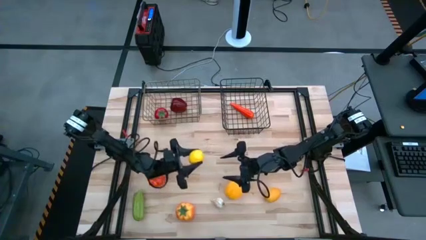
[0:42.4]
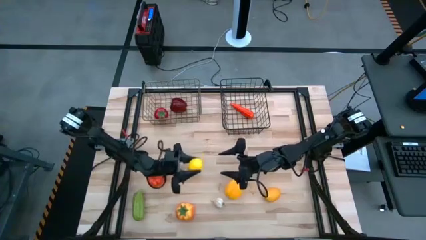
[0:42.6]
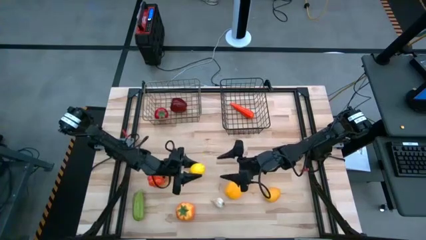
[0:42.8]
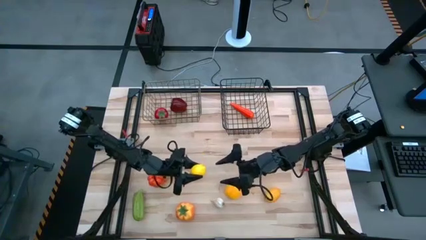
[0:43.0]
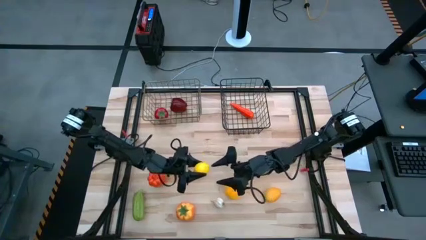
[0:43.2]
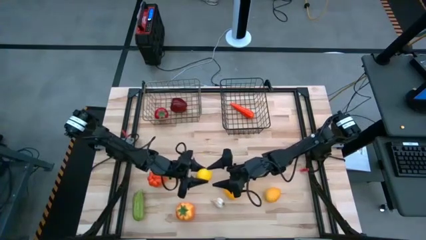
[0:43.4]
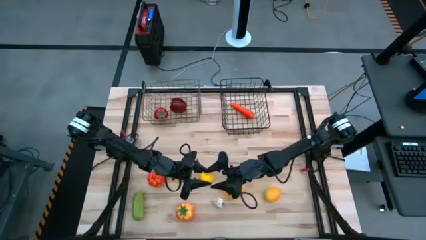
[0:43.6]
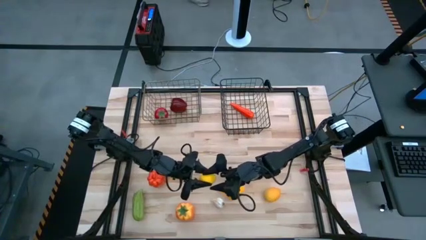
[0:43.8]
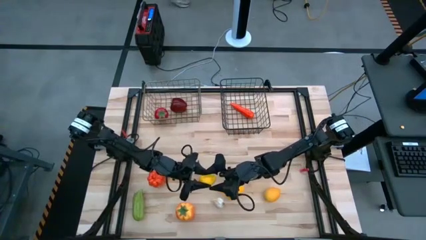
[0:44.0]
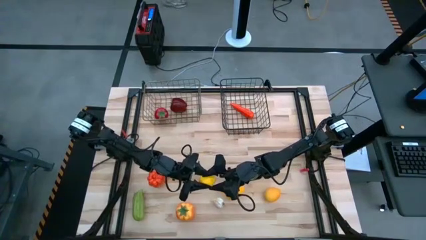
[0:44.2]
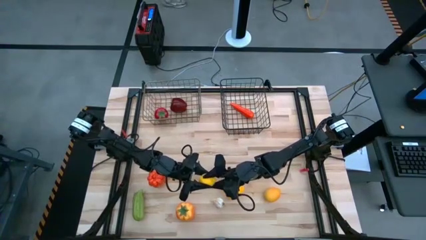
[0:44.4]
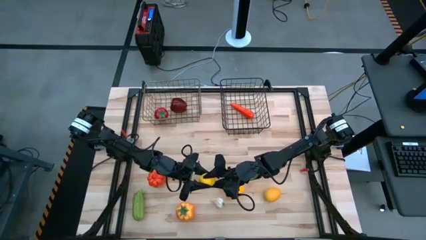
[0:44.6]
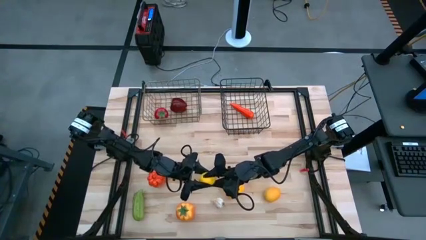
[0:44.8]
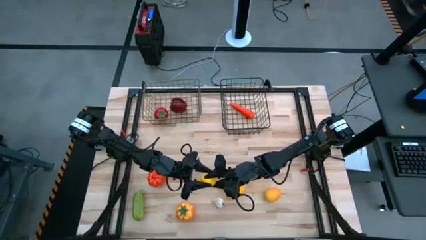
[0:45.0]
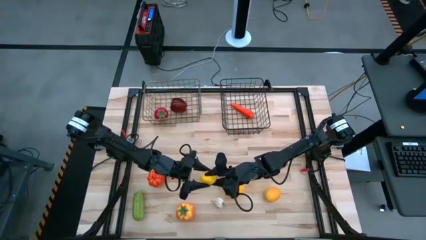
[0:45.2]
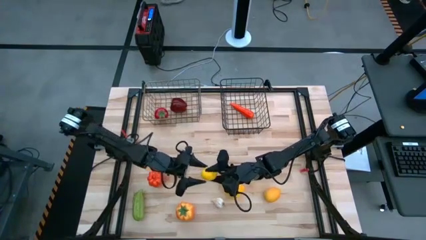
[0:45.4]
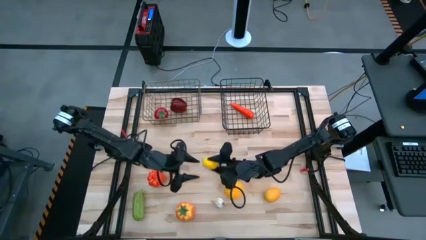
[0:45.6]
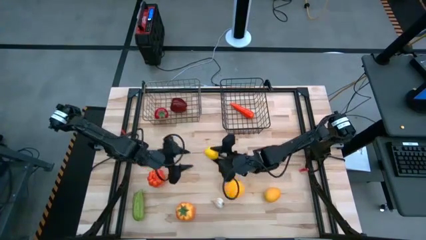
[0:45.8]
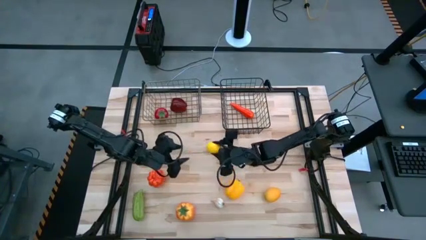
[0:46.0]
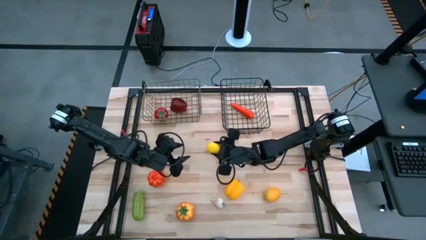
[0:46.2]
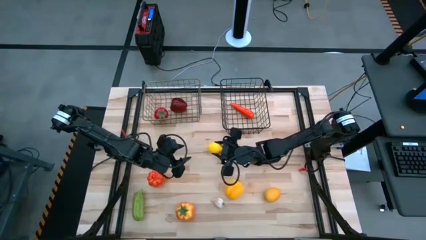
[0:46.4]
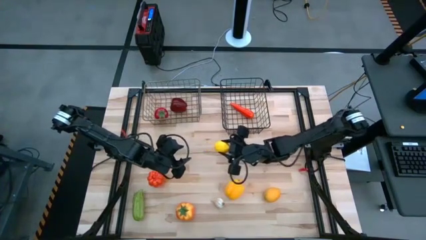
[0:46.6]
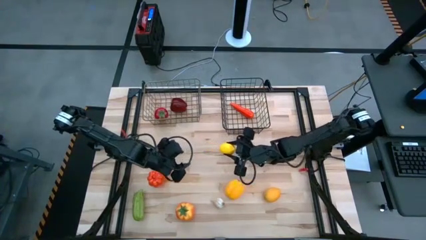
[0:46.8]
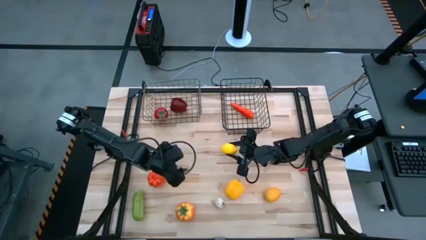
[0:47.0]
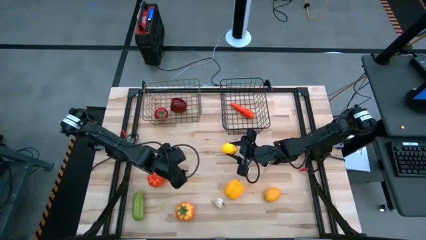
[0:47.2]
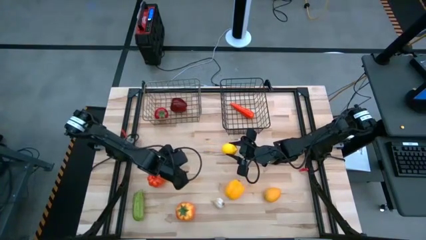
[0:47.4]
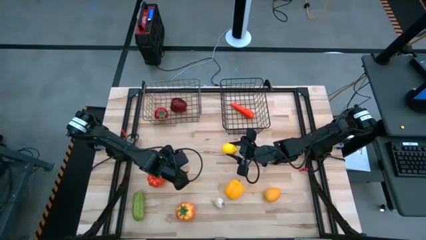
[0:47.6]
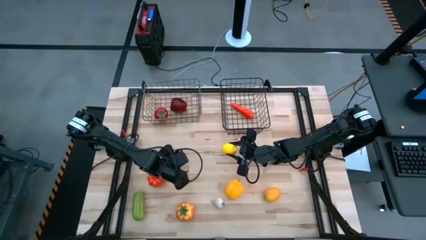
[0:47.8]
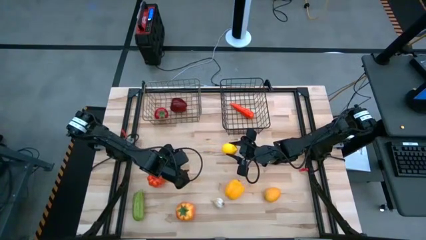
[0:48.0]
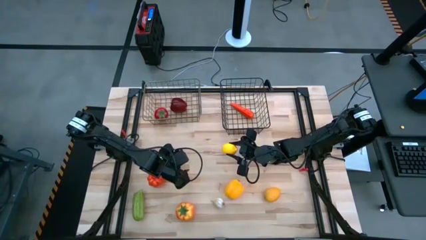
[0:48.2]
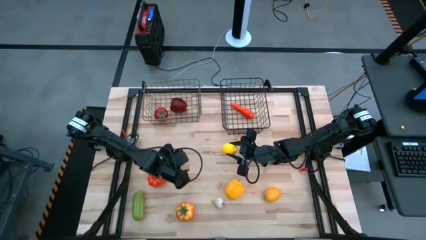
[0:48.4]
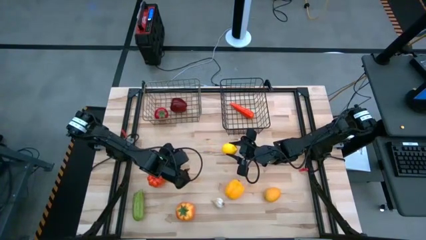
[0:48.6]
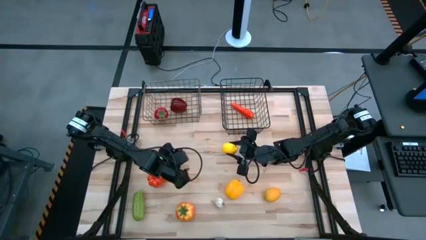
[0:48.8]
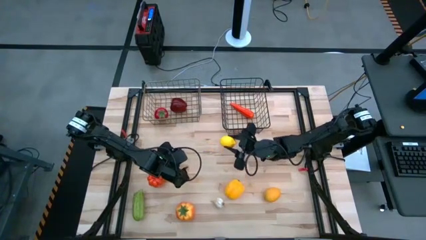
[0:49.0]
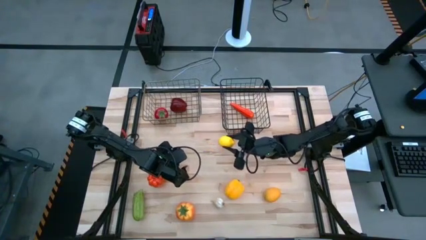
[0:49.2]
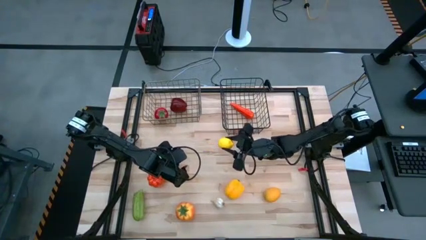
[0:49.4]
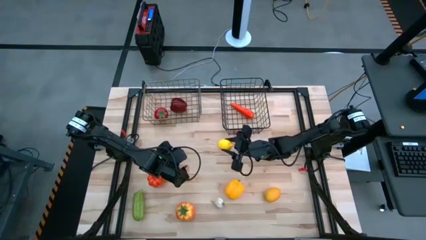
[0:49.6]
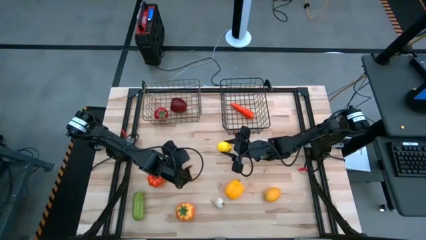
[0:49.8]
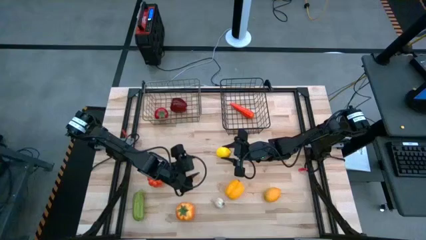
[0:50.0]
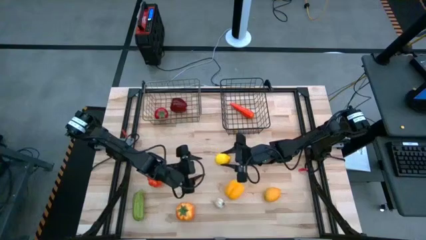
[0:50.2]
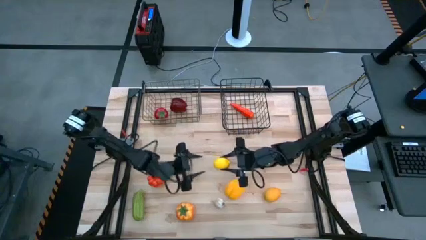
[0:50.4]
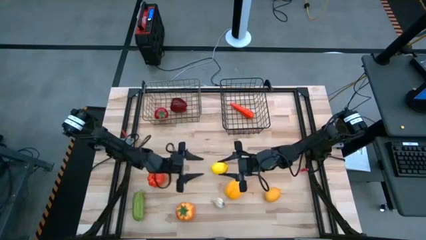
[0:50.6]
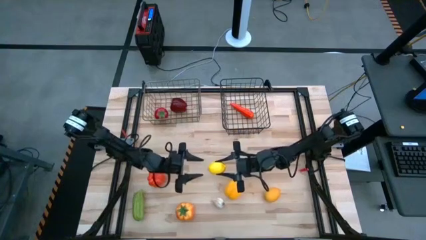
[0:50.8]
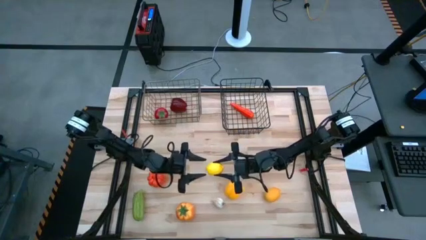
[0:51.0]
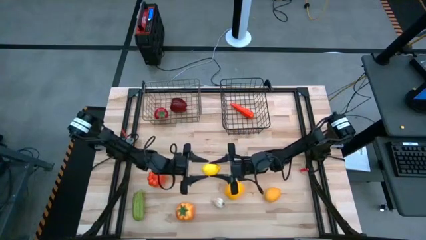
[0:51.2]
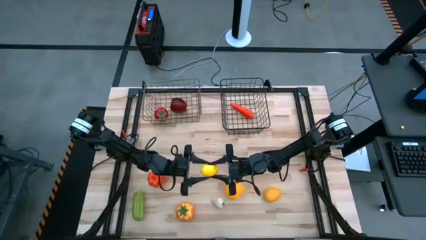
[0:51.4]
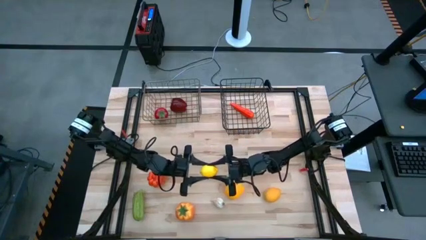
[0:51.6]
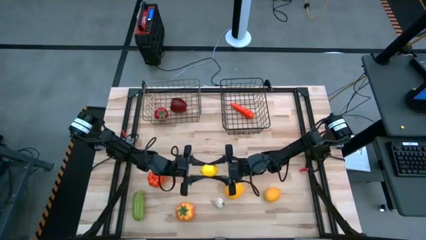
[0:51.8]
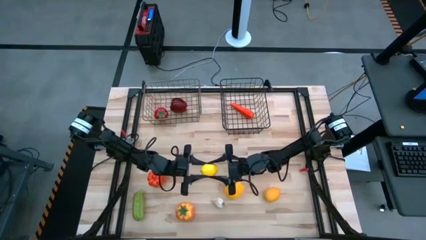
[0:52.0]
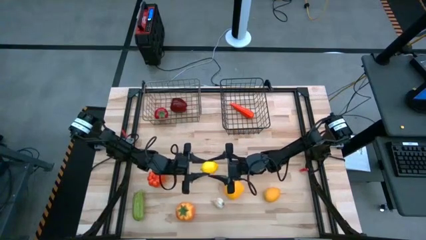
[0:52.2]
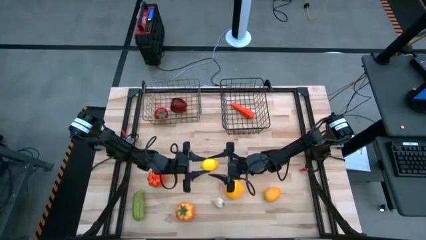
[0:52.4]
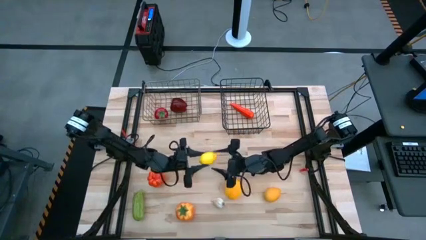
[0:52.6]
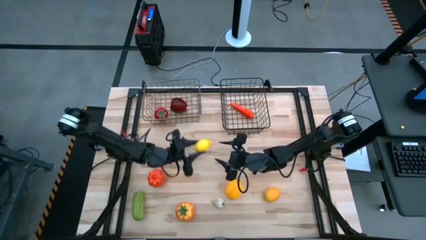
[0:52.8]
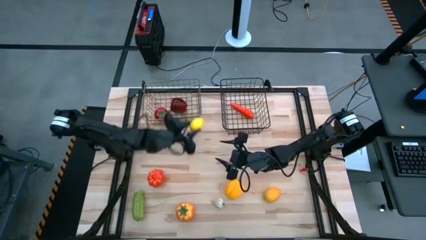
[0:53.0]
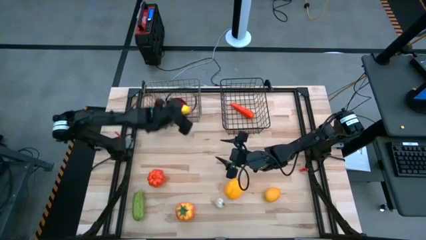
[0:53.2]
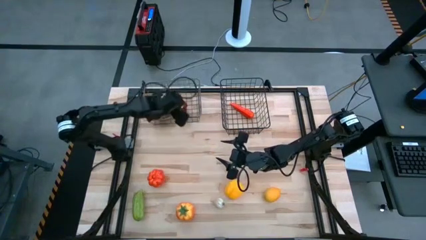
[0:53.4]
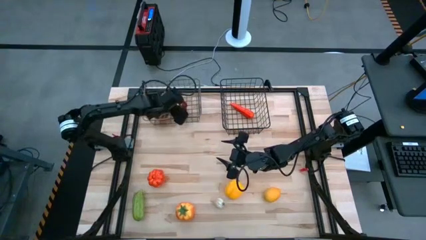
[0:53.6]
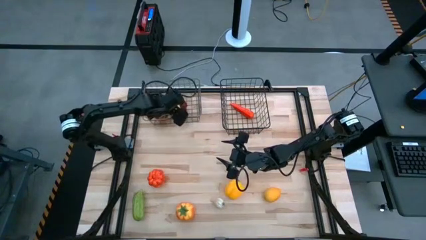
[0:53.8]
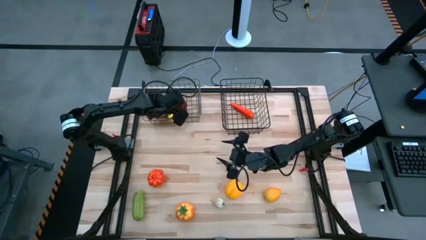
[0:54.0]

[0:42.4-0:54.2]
Task: Sort produce into baskets
Put the lemon into the gold wire basket

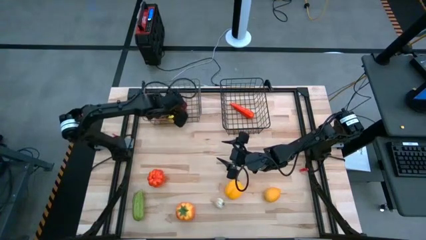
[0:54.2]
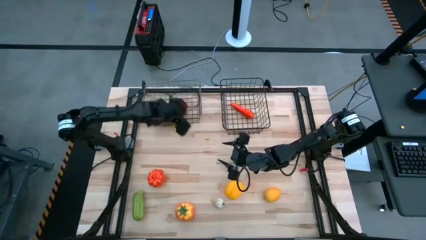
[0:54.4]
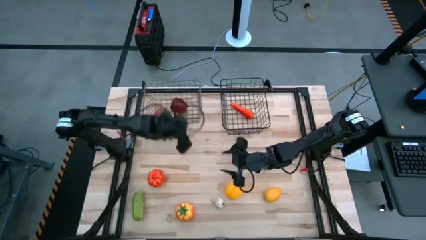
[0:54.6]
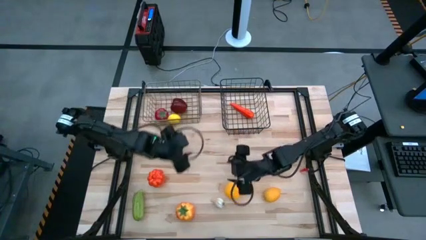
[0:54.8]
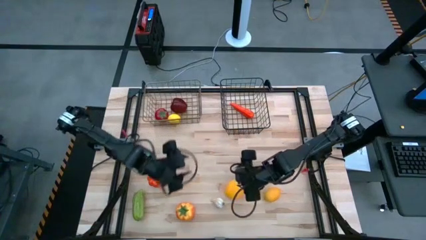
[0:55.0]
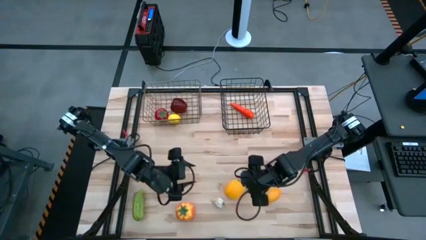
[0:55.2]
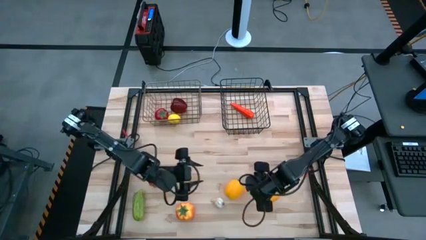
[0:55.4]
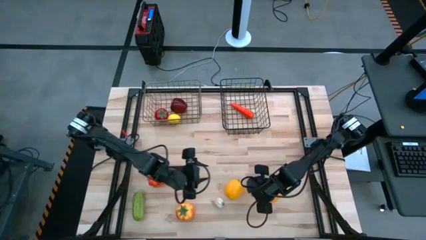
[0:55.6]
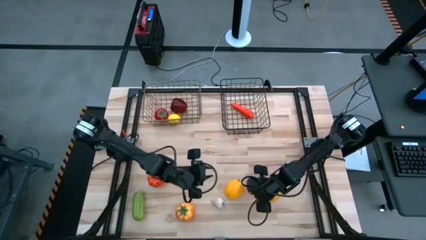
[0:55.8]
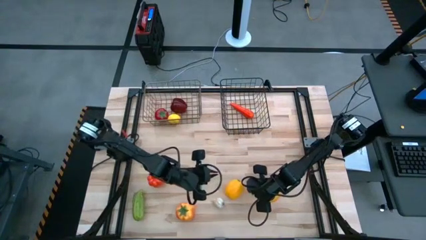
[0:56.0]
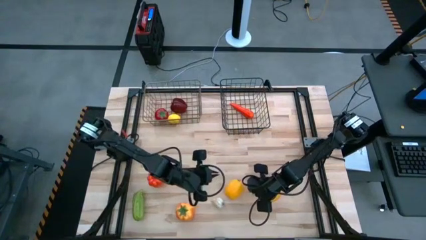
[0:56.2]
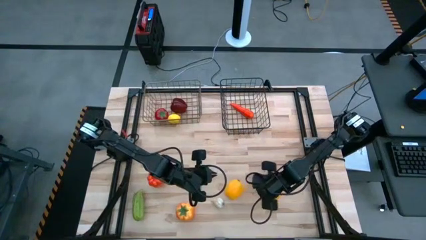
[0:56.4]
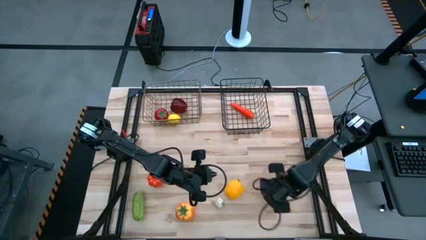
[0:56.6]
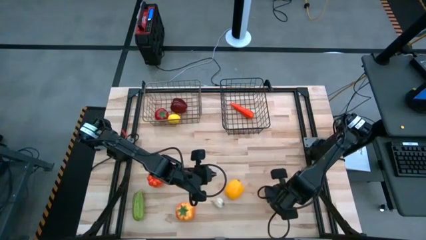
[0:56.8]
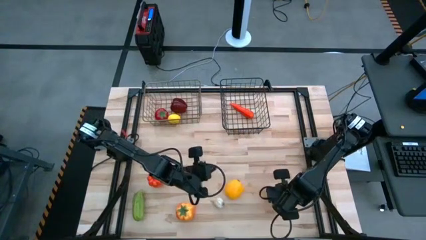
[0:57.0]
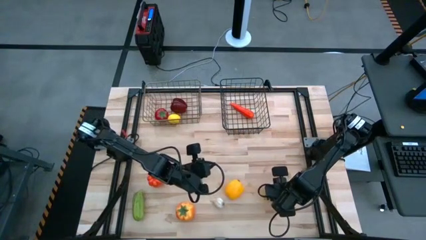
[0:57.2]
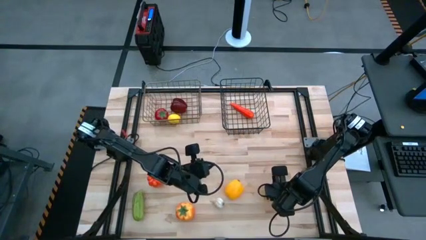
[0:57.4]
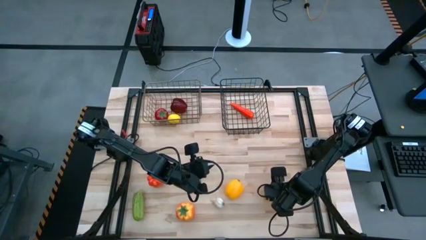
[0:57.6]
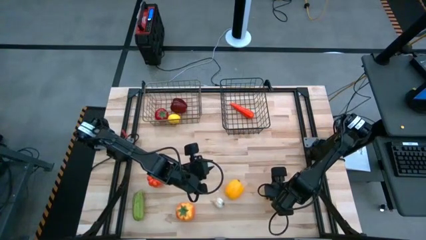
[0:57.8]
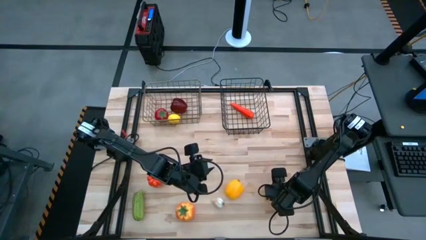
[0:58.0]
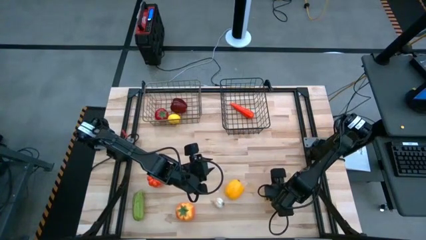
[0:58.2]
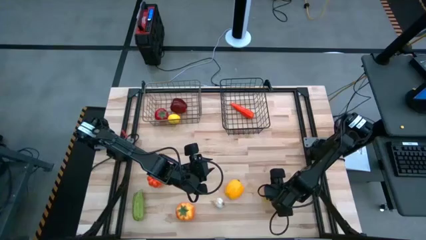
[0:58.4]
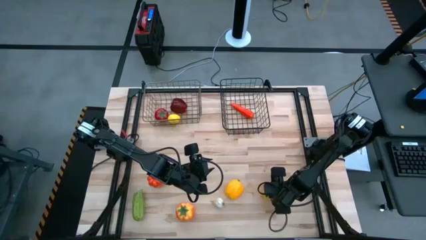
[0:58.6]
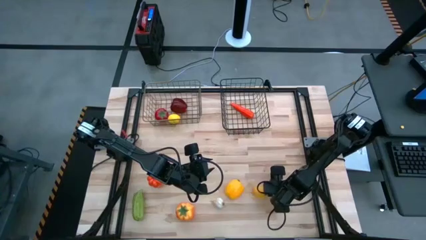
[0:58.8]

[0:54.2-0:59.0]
Put the lemon into the gold wire basket

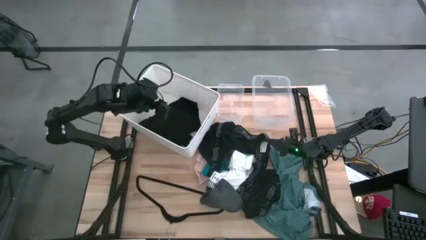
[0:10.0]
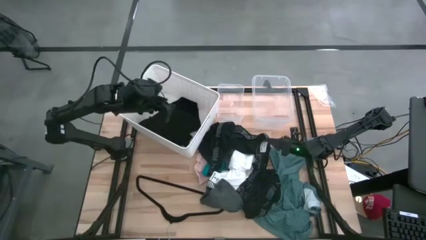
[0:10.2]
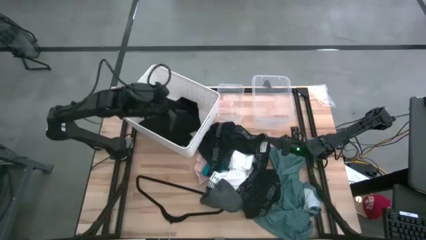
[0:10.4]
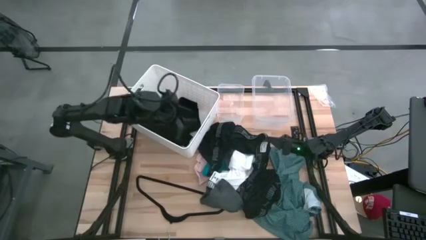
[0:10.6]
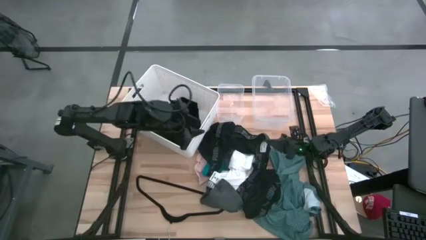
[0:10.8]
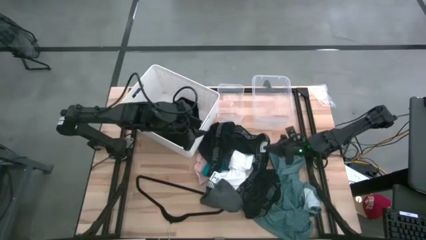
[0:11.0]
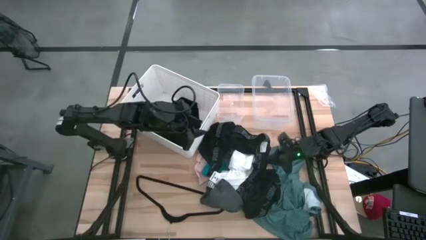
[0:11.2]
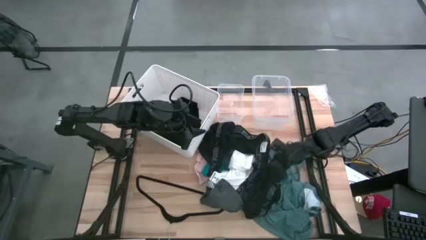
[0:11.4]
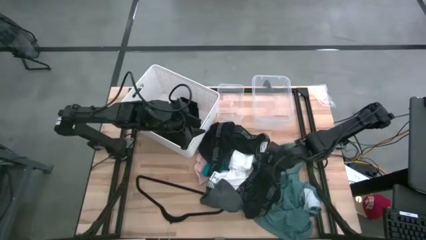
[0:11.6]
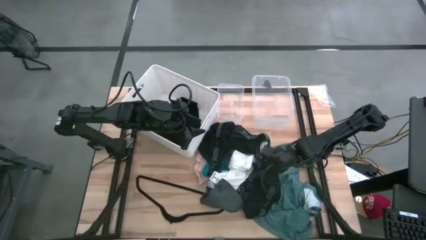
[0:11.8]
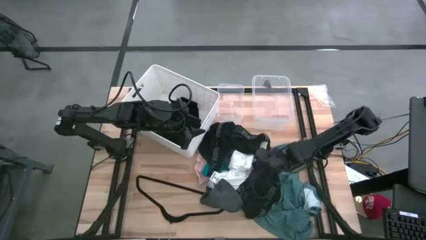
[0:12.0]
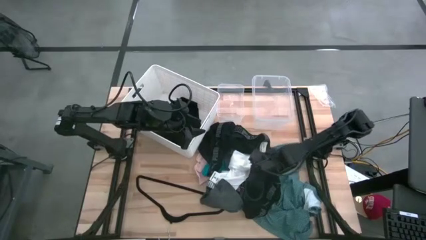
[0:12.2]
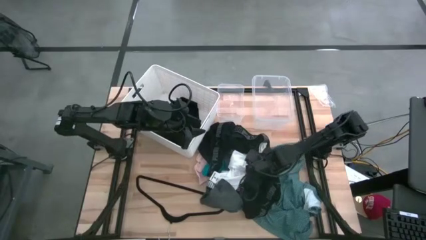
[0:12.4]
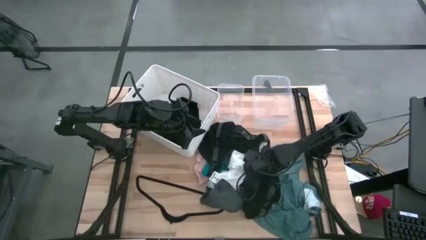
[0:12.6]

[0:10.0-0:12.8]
Task: Pick & Place Cloths
Put the black underwear into the right transparent bin
